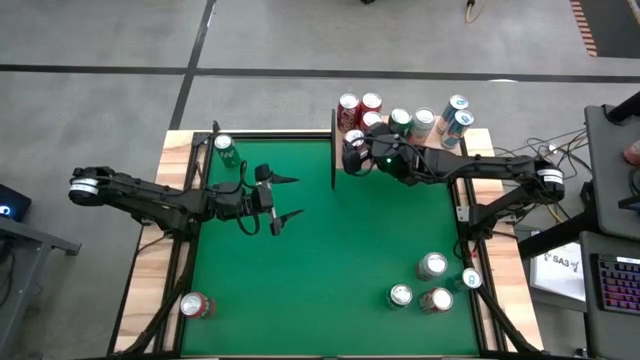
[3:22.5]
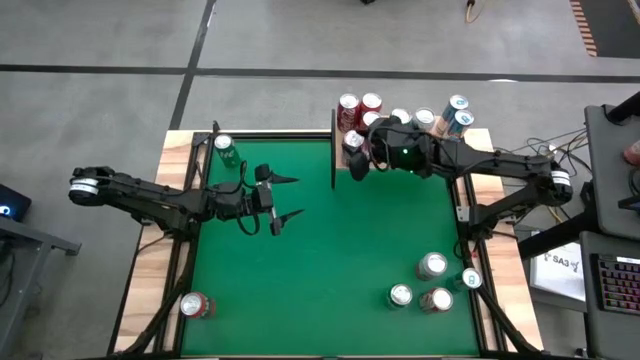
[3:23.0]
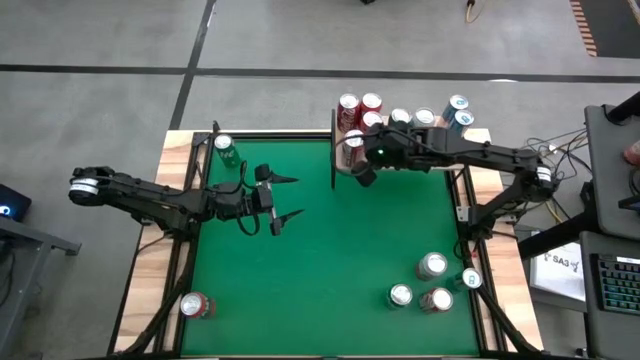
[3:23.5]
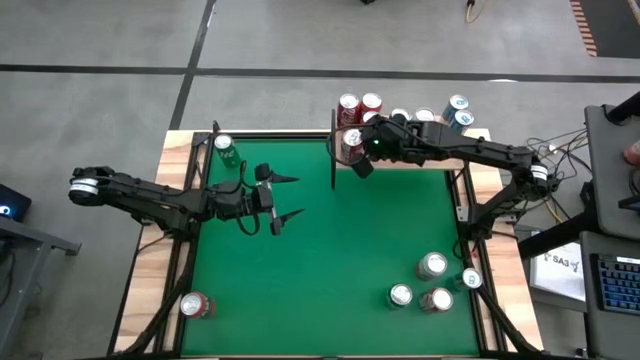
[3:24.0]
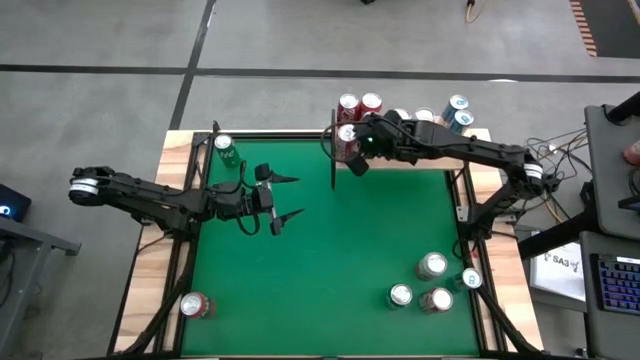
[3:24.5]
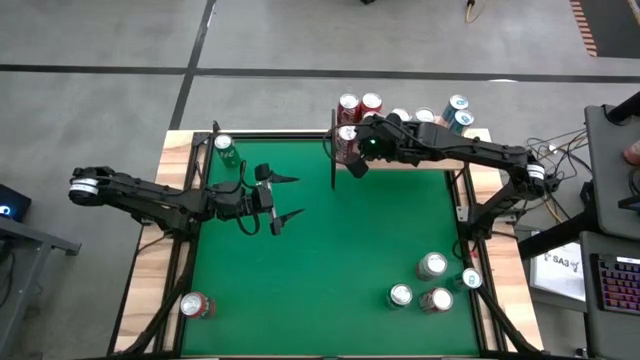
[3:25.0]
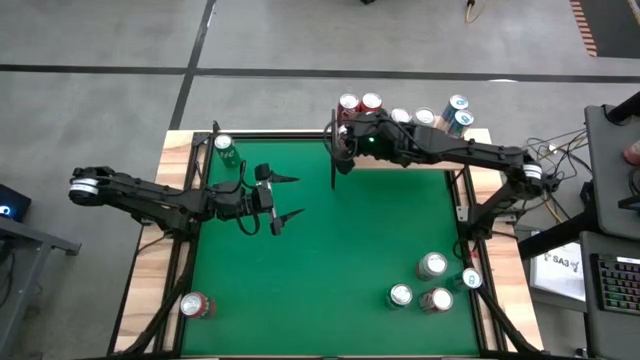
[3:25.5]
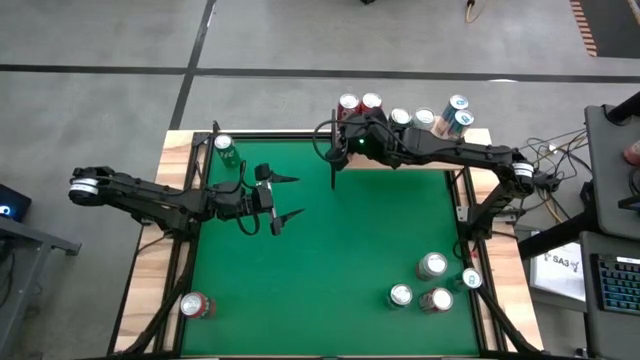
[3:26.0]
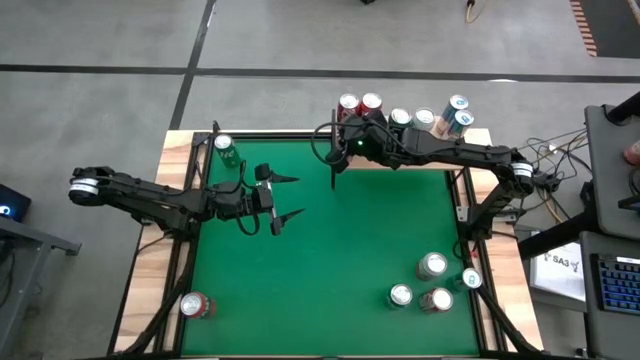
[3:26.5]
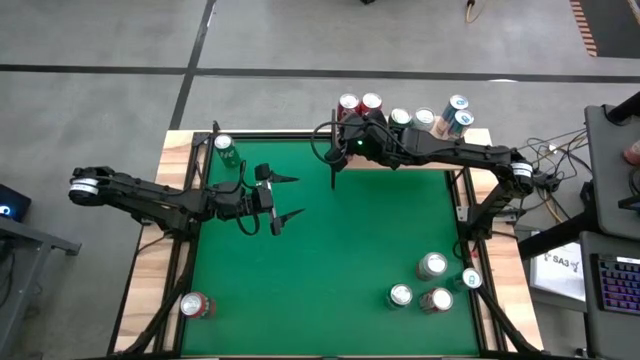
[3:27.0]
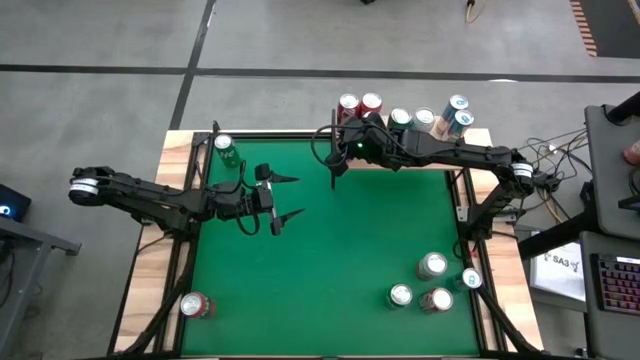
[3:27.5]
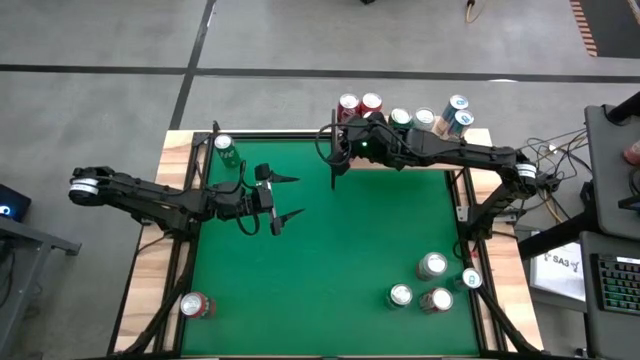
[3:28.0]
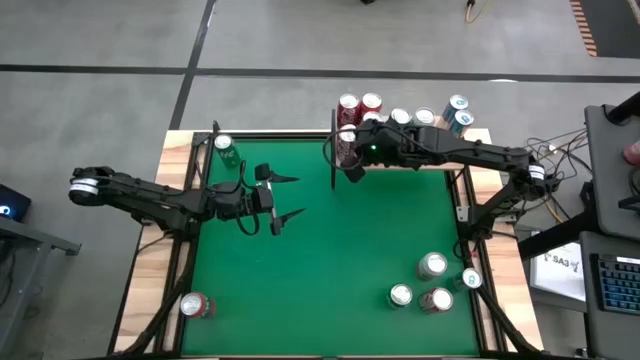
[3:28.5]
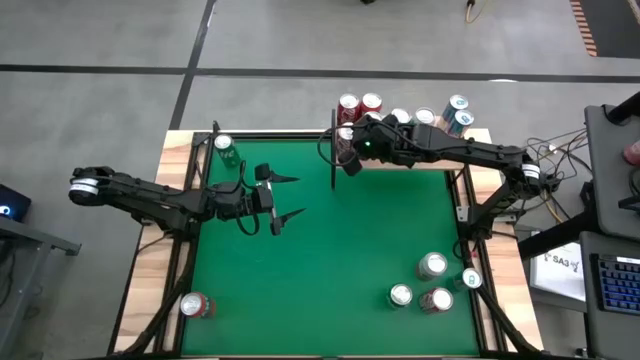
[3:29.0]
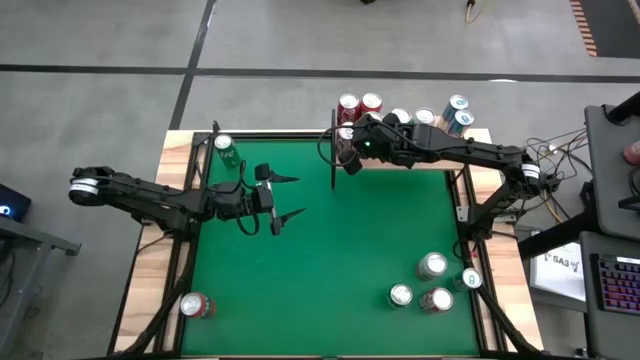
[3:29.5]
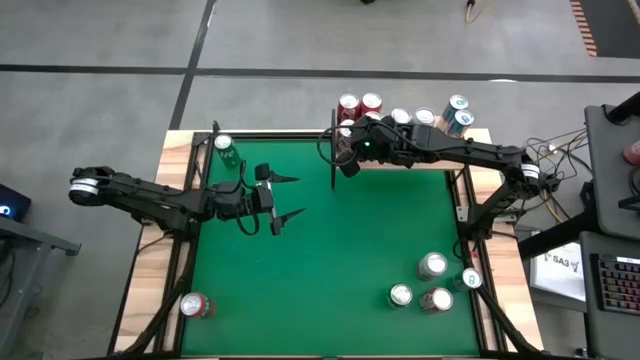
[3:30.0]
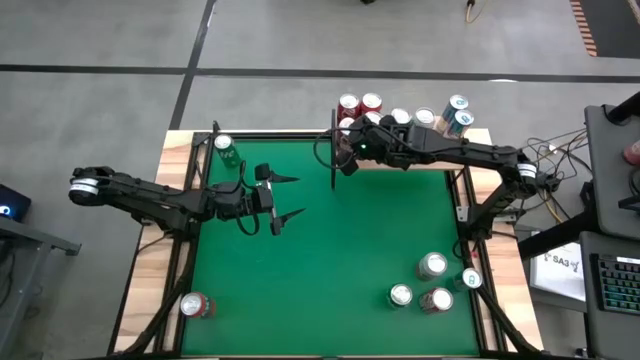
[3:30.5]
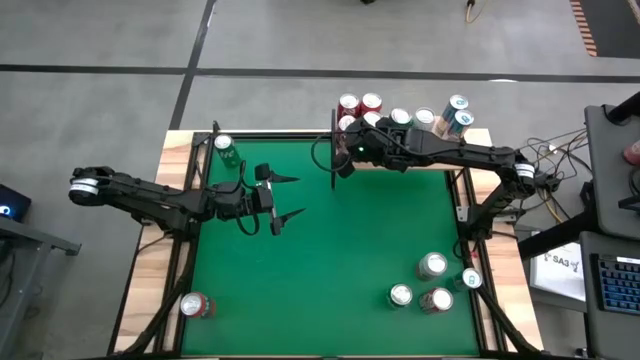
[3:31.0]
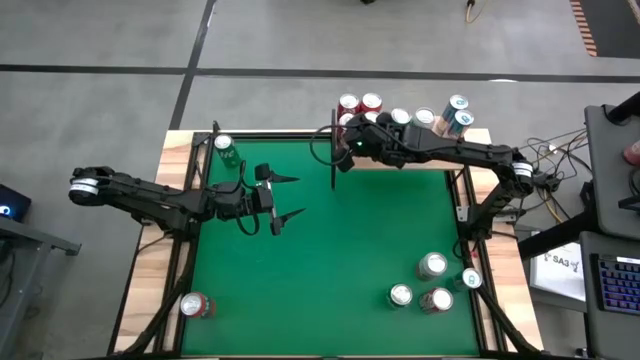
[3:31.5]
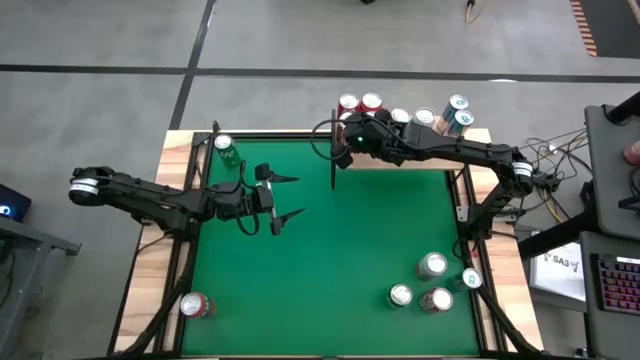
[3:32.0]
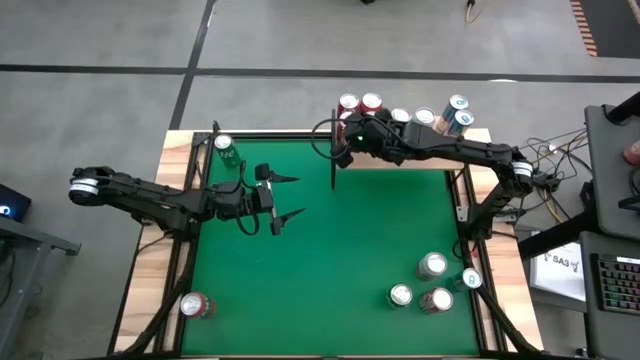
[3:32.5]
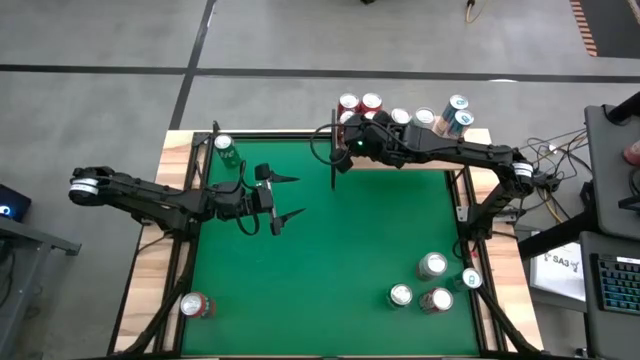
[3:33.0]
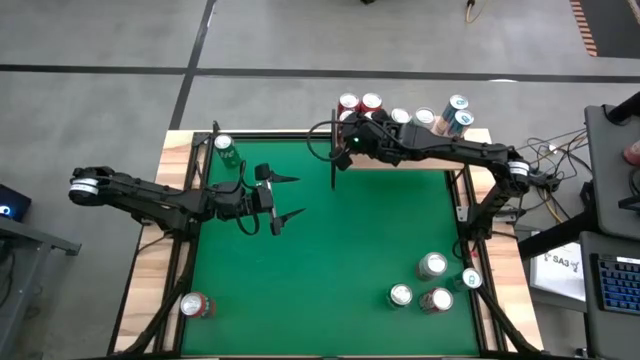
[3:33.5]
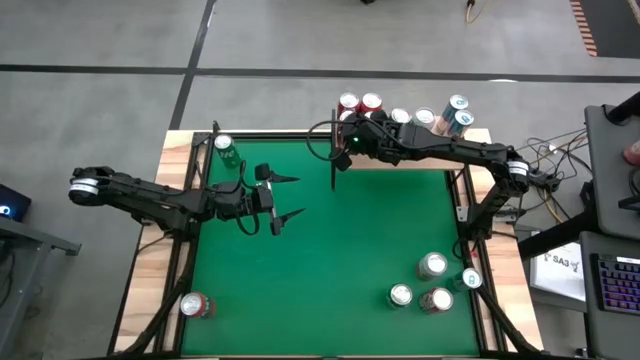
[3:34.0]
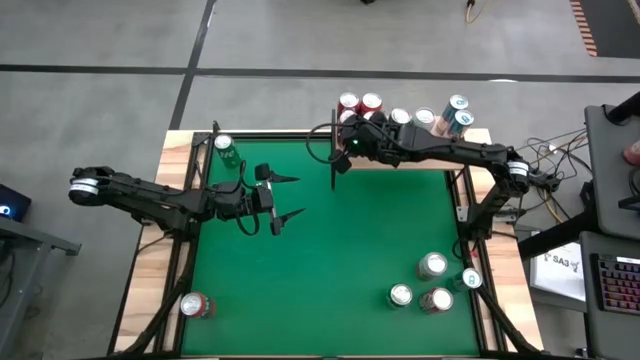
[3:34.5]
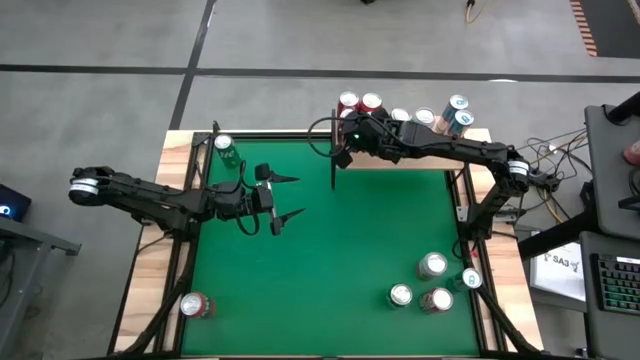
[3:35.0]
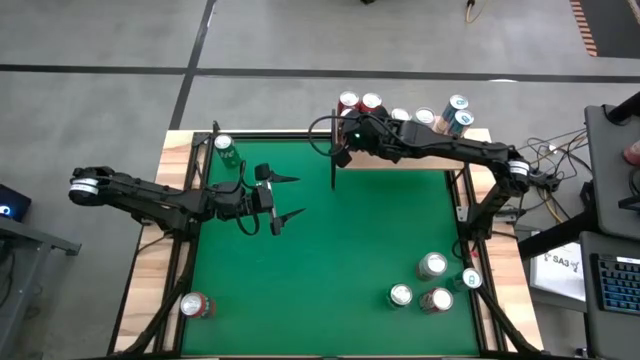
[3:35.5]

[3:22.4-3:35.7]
Task: Place canned beverage on shelf
Put the left red-white soda can on the shelf aligned with the other red-white soda can

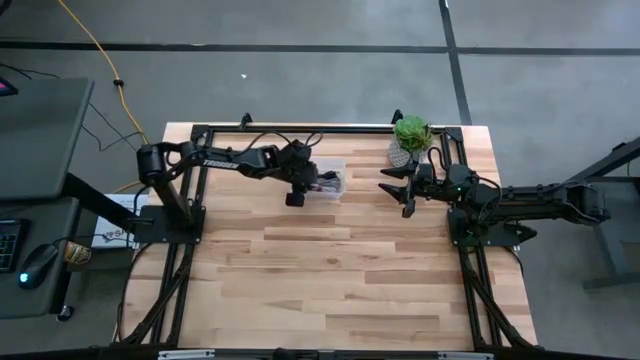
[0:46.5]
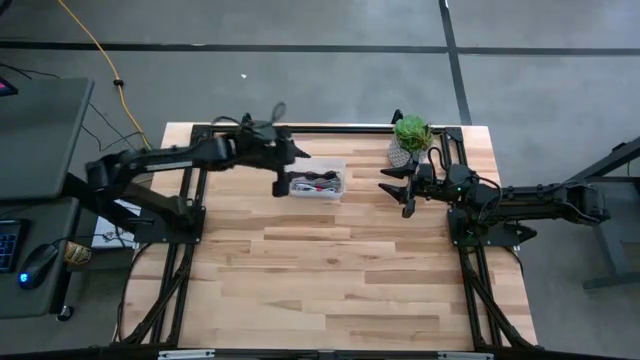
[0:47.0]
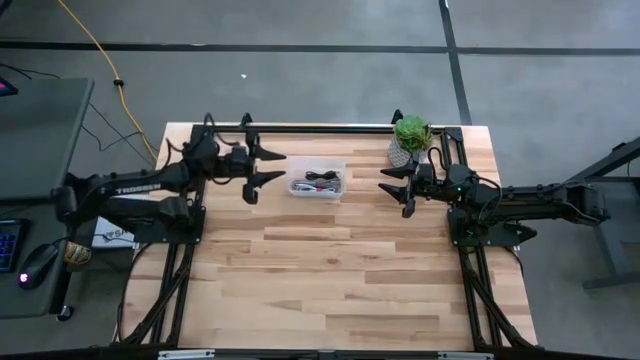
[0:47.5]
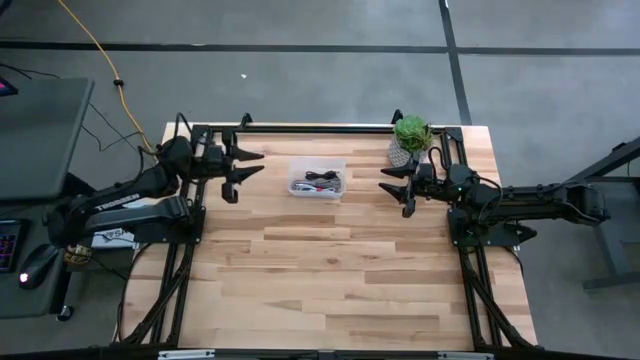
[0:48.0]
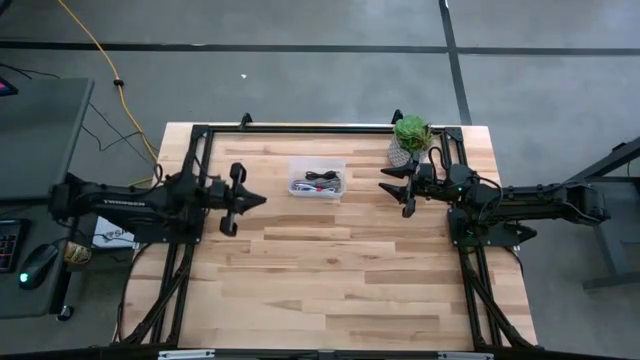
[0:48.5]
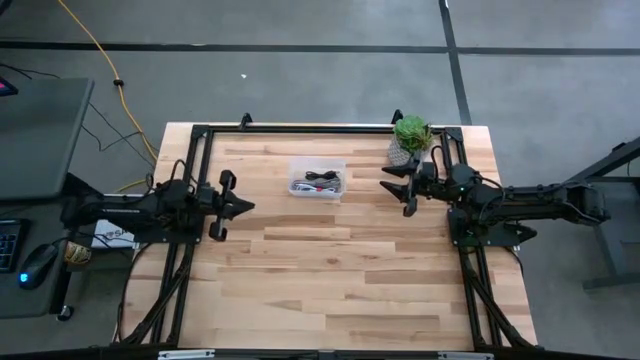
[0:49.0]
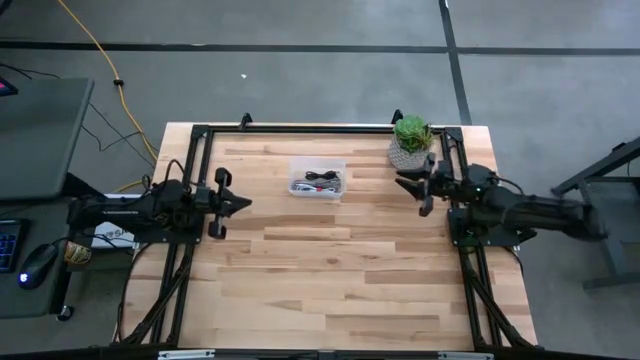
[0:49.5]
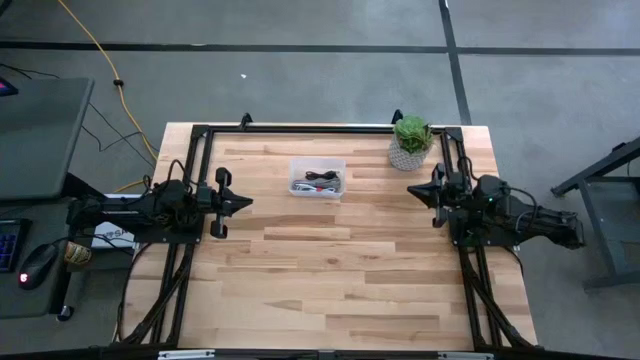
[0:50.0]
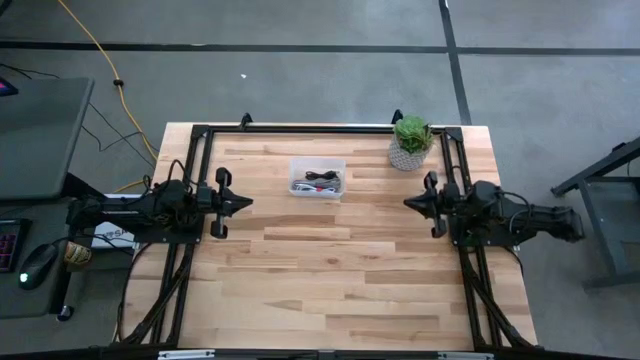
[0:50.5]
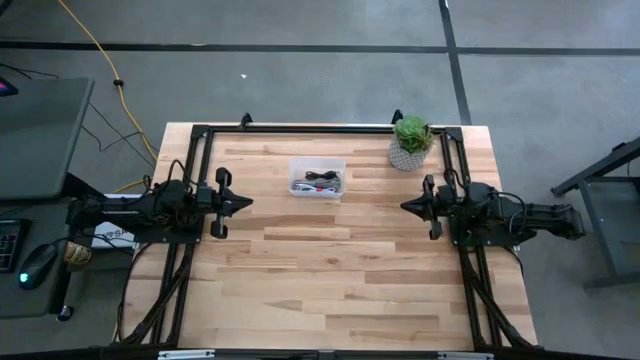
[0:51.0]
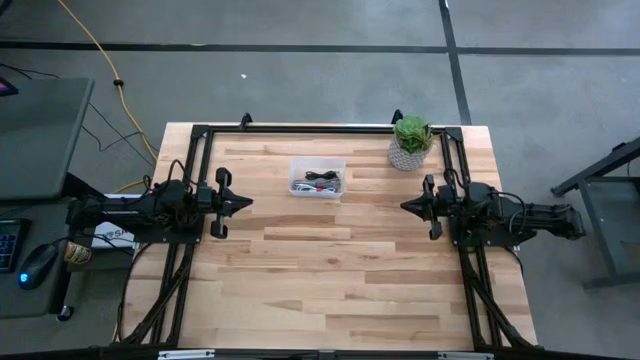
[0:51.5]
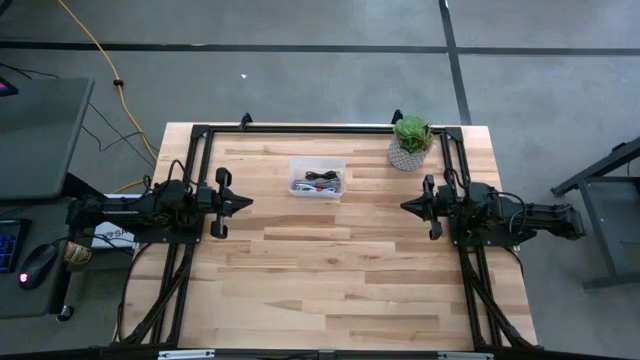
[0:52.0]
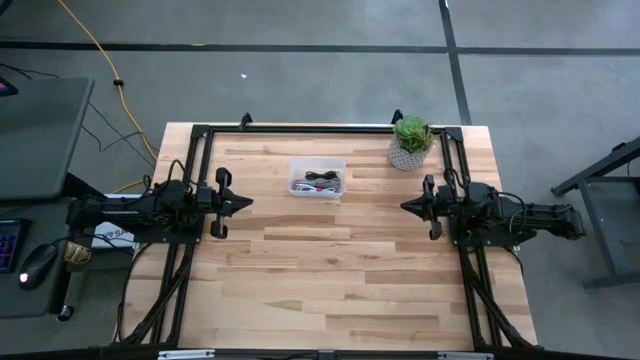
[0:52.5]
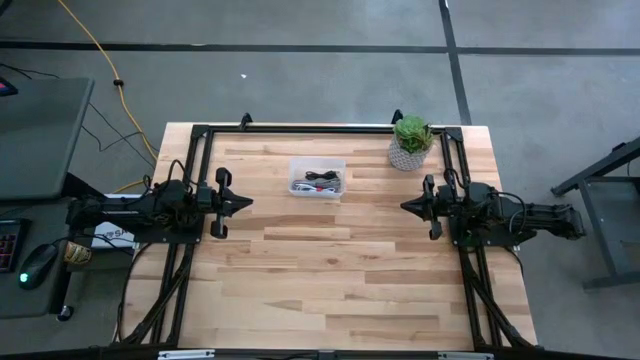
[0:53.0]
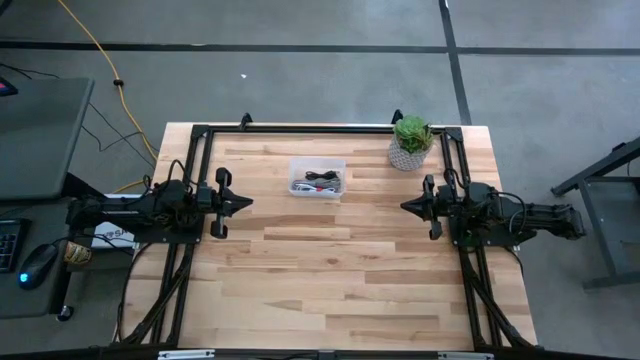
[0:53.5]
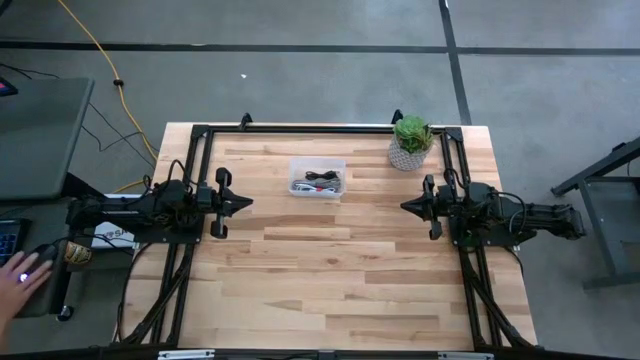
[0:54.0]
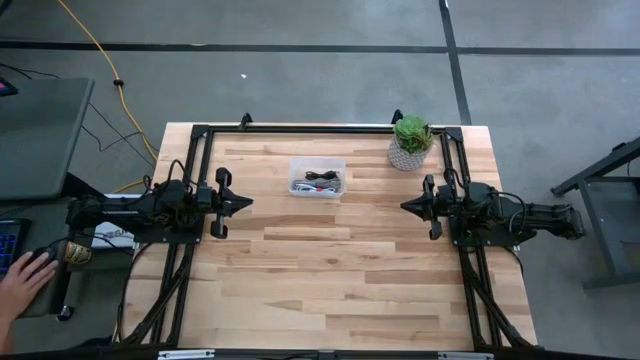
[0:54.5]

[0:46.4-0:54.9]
Task: Pick and place USB-C Cables
Return to Home Position
